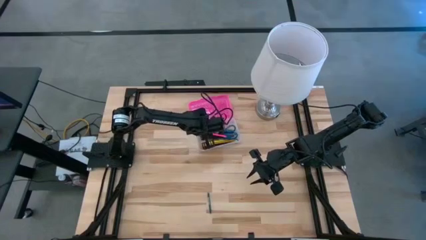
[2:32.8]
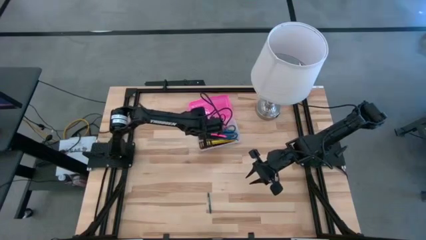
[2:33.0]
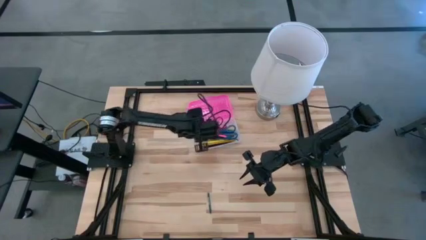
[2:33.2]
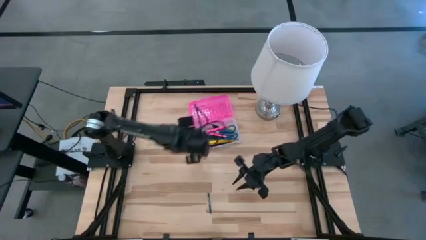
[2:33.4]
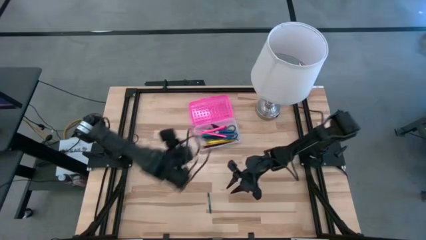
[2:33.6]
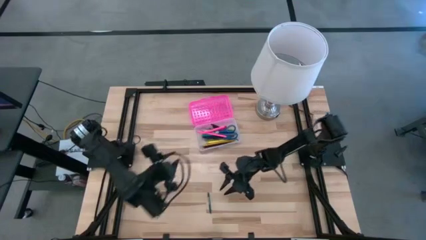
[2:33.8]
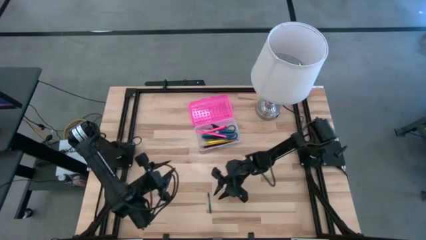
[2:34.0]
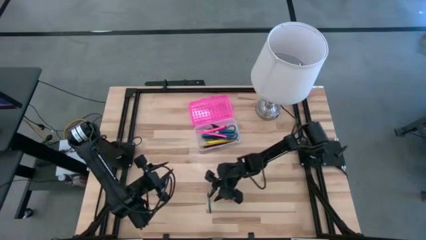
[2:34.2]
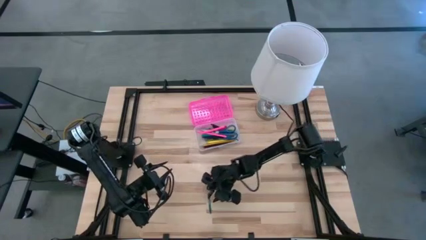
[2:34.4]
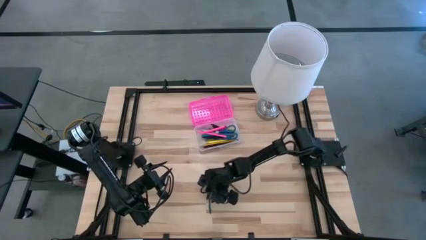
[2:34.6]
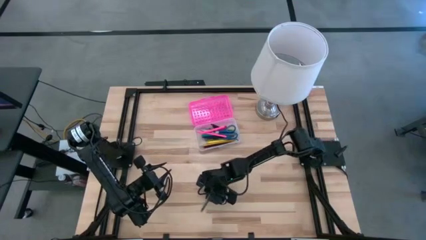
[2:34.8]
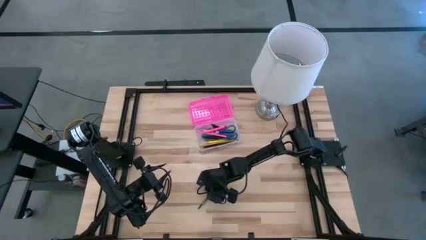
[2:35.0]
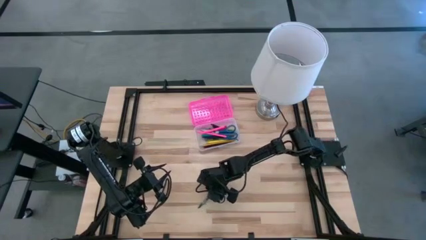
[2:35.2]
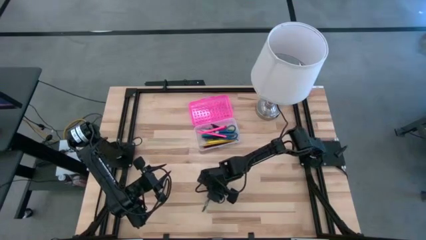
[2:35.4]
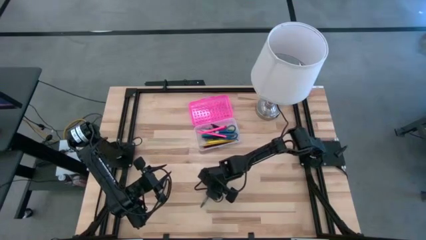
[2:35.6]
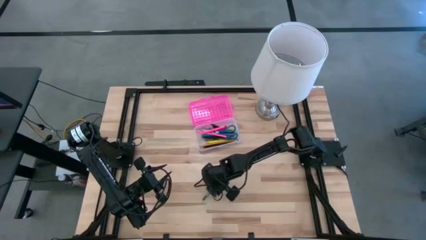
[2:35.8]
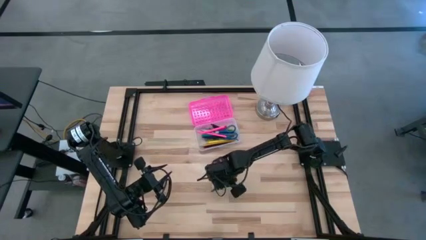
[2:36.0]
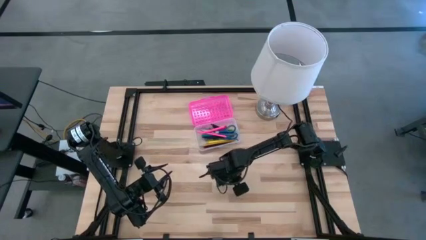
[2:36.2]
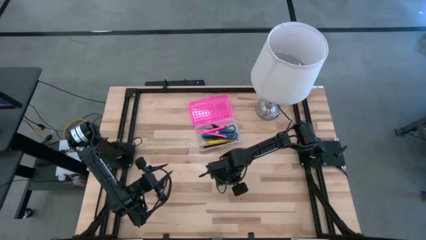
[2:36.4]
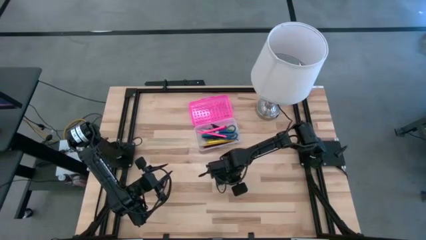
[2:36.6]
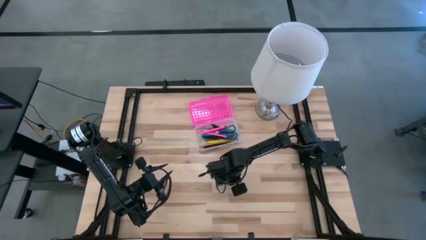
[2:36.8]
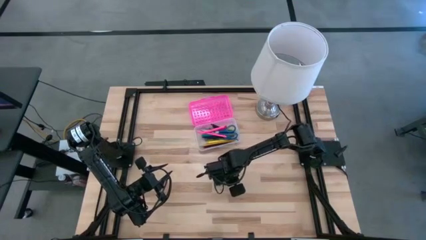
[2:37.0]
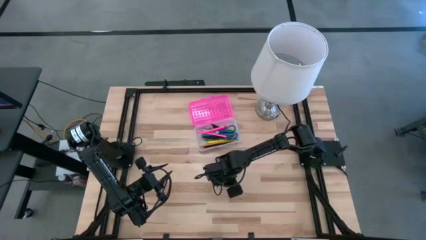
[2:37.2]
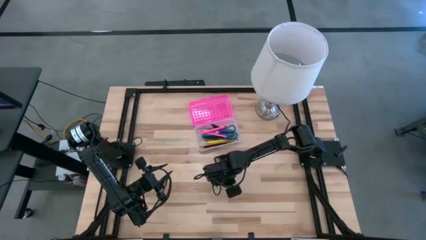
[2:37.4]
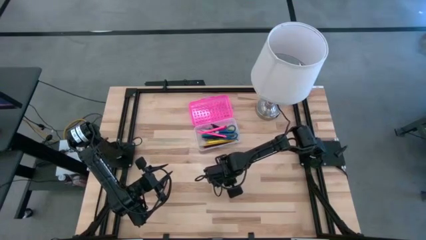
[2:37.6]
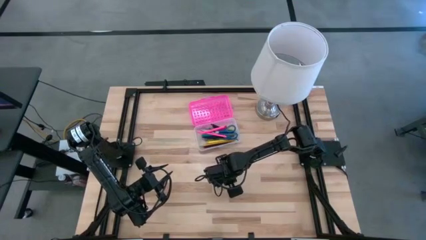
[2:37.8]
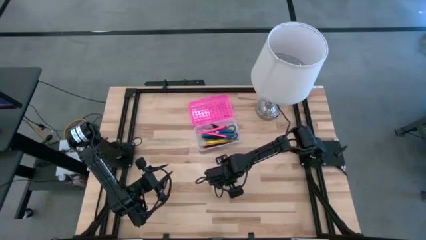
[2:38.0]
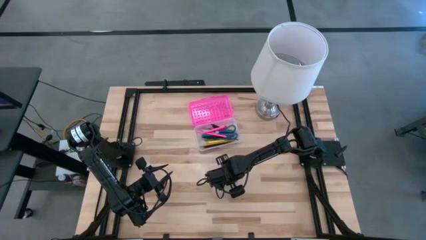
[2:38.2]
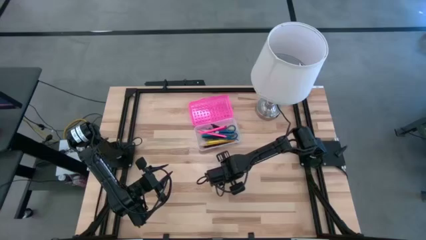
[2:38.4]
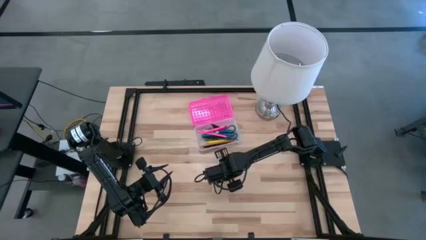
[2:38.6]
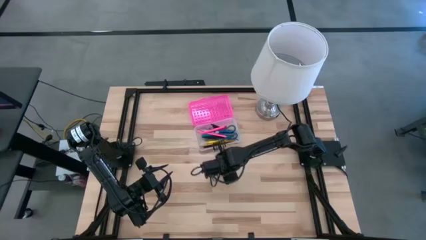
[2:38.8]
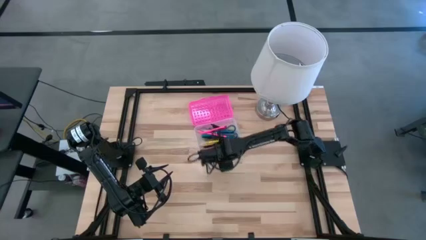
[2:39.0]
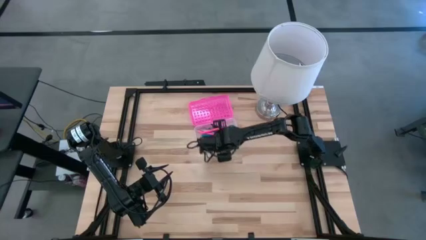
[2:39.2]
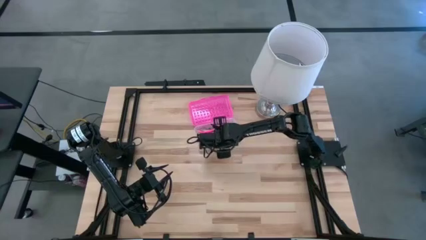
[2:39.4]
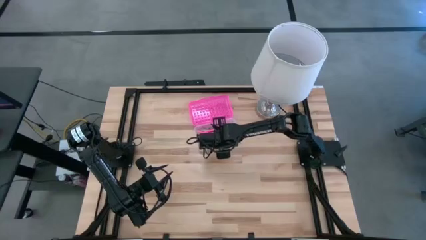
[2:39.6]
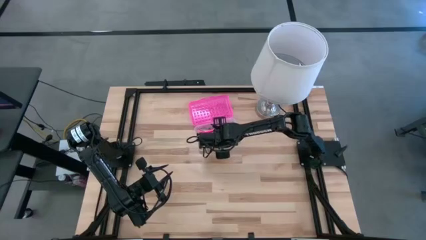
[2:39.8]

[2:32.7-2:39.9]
Task: Pick & place school supplies into a supply box
Put the green crayon into the pink supply box

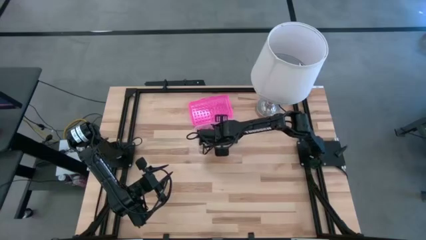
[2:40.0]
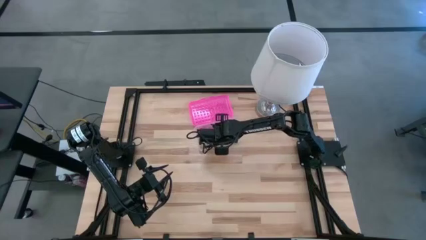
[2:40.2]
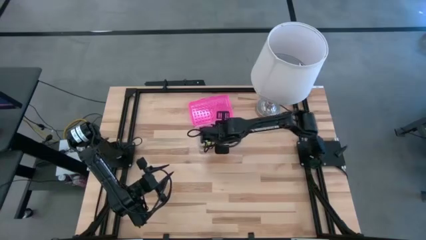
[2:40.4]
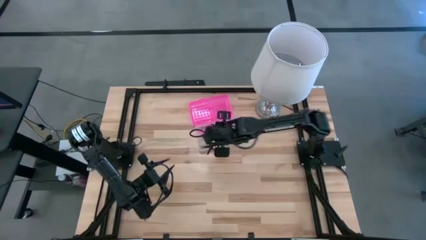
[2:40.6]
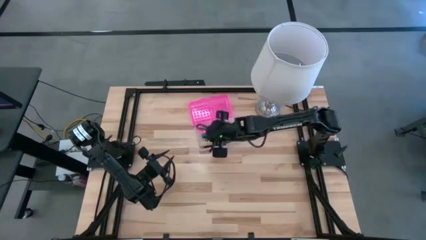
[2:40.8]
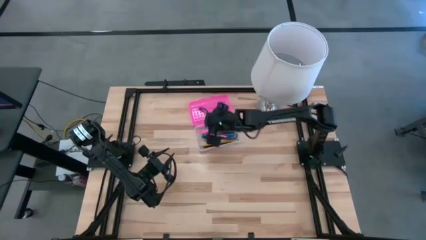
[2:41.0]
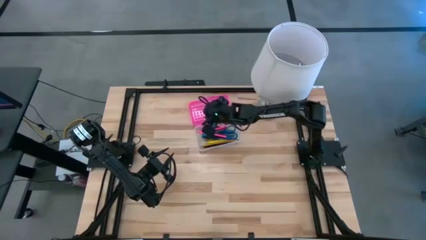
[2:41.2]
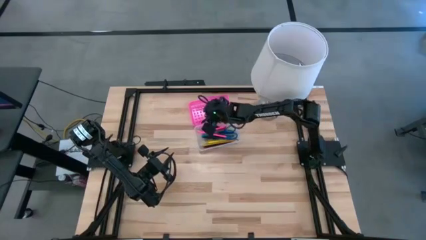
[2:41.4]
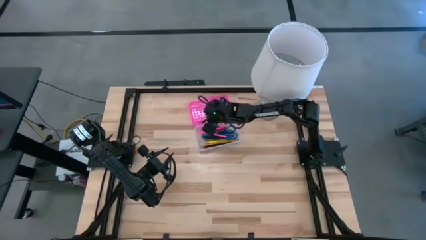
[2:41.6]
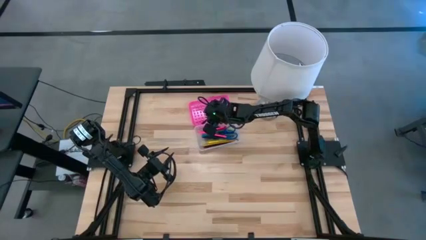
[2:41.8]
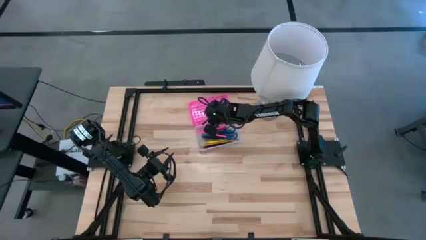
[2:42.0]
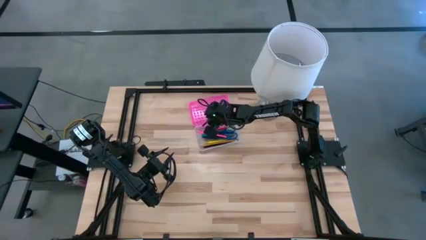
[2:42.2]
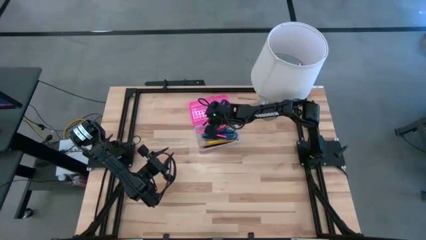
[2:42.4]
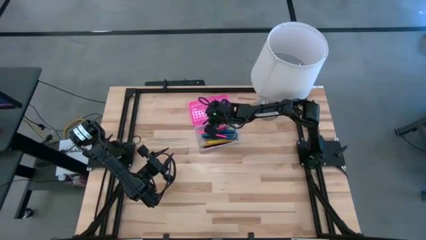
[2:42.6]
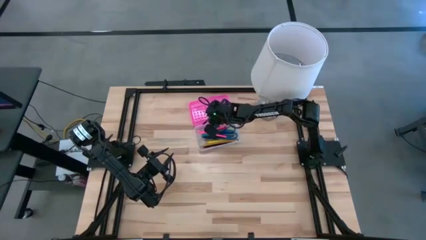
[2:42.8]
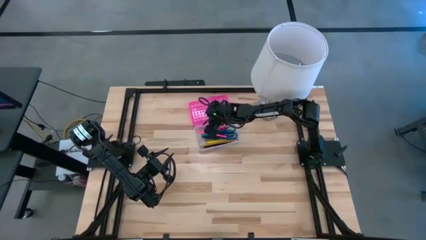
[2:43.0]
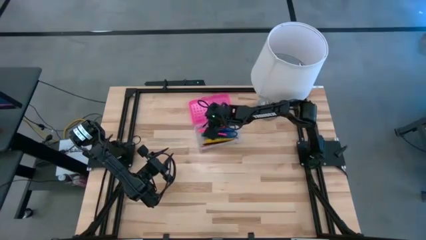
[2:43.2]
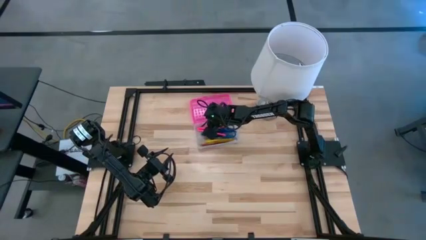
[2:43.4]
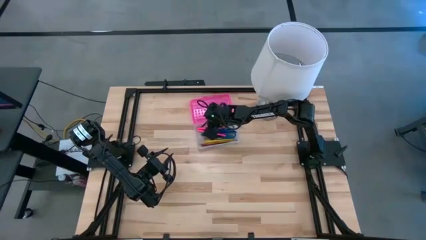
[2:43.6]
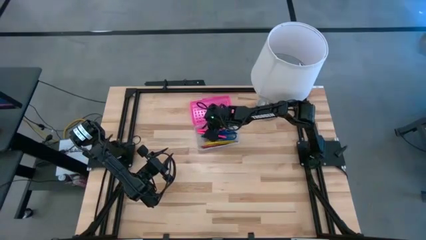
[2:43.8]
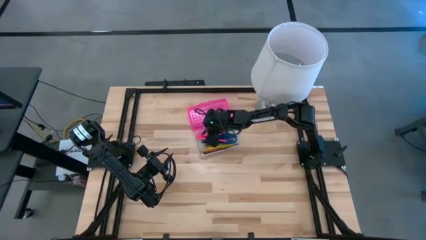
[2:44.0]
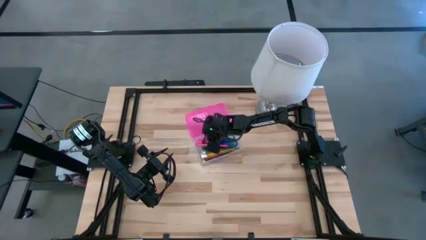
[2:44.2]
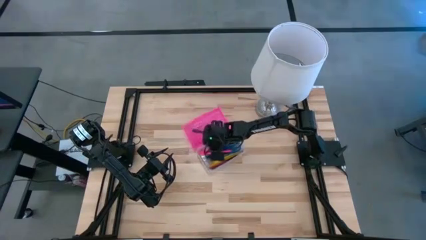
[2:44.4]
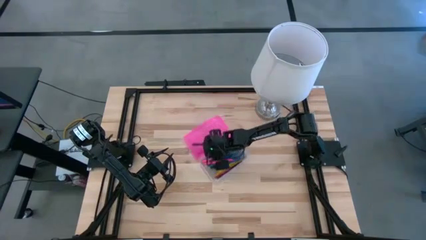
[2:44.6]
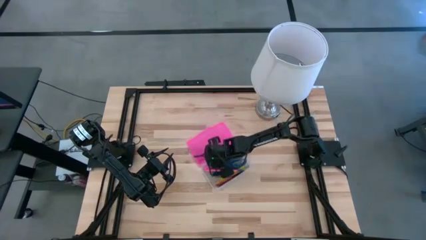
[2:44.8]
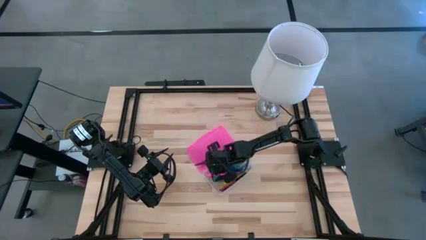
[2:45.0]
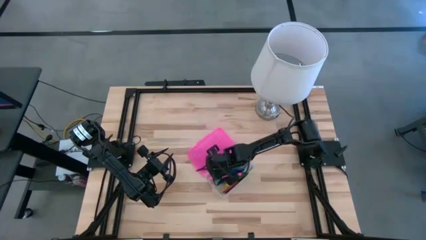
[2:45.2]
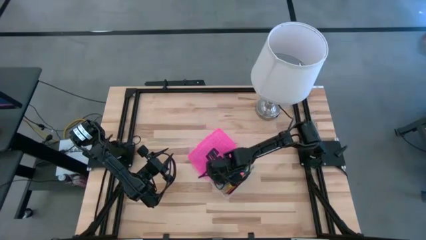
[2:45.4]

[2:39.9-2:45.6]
Move the pink supply box to the center of the table
